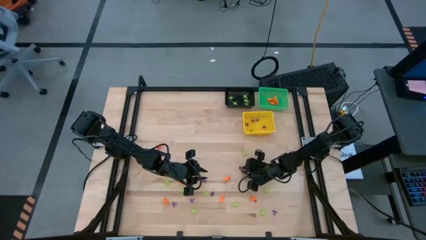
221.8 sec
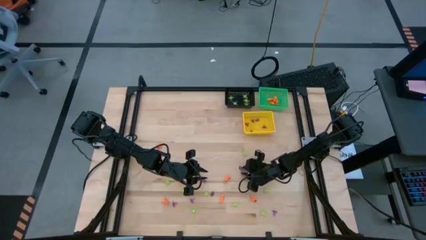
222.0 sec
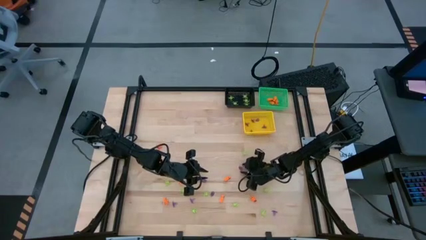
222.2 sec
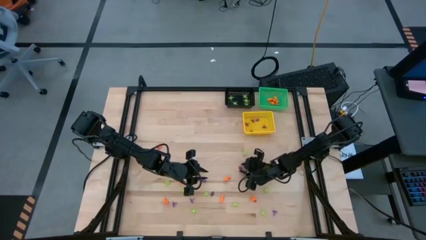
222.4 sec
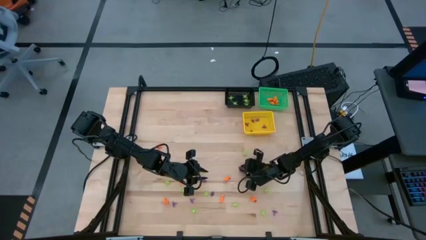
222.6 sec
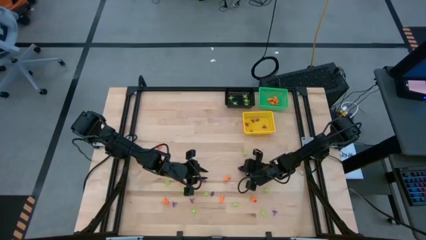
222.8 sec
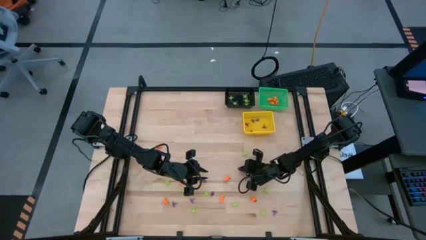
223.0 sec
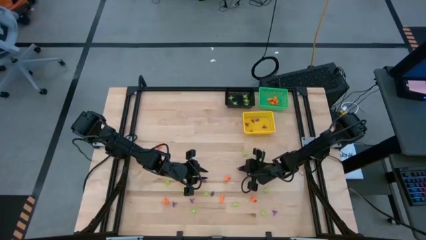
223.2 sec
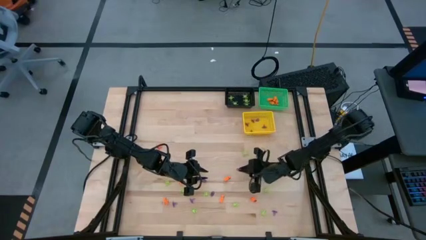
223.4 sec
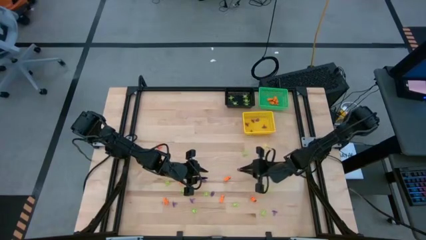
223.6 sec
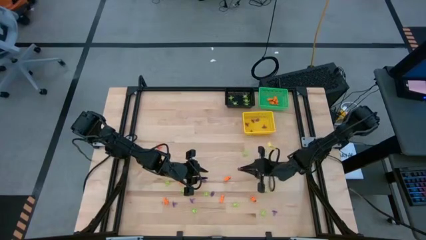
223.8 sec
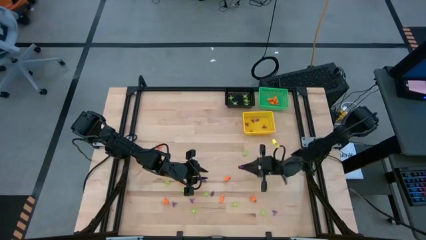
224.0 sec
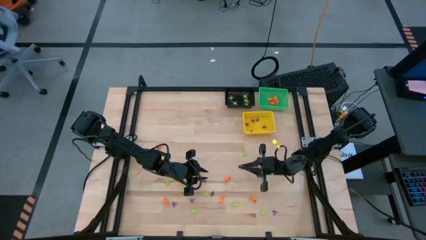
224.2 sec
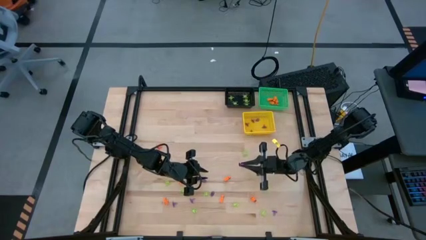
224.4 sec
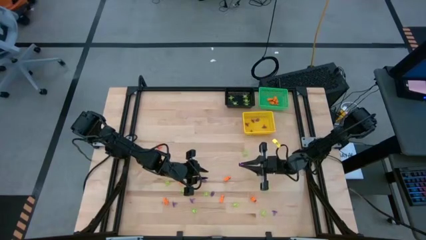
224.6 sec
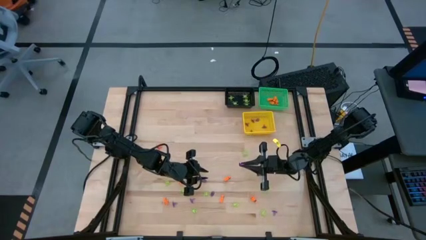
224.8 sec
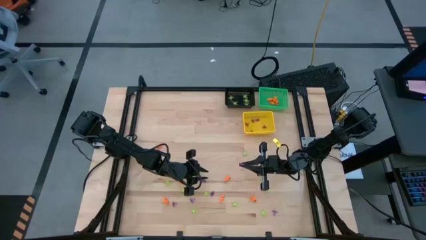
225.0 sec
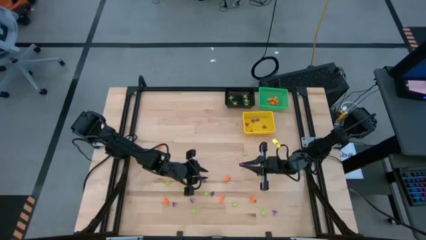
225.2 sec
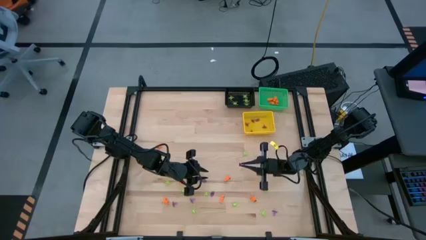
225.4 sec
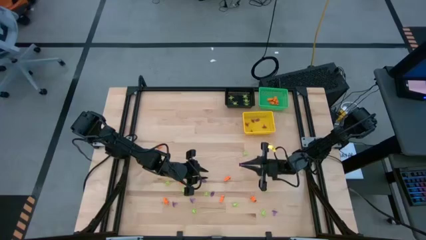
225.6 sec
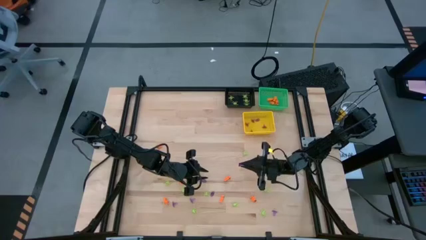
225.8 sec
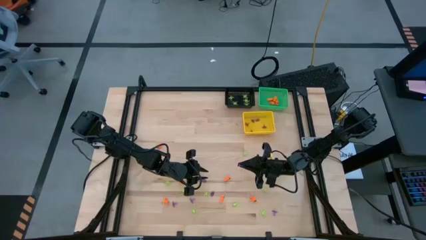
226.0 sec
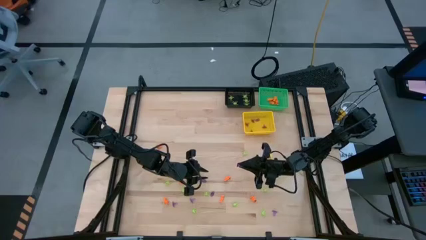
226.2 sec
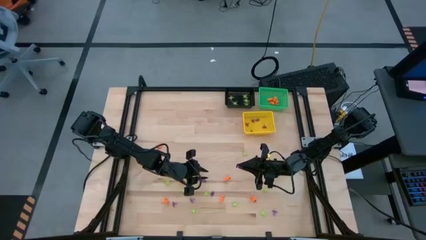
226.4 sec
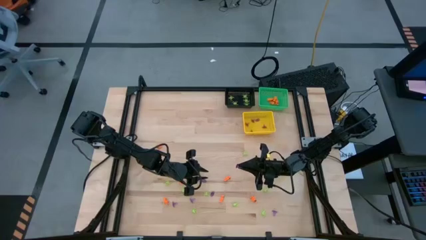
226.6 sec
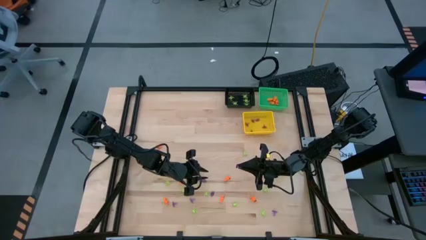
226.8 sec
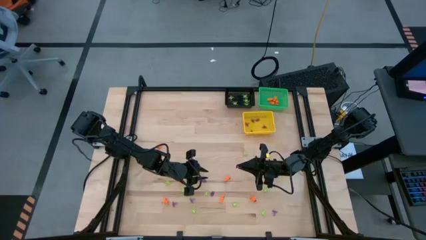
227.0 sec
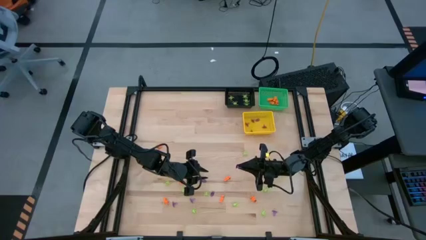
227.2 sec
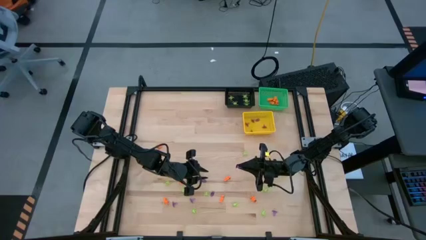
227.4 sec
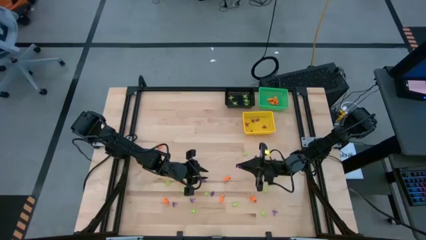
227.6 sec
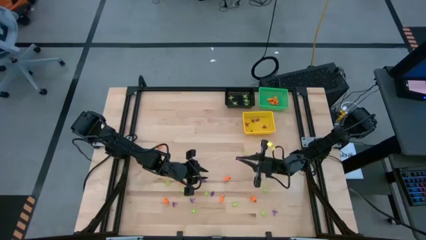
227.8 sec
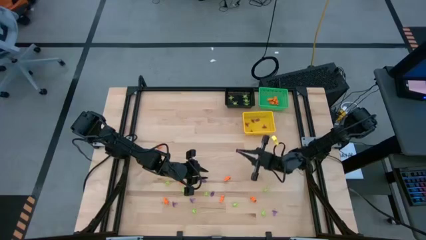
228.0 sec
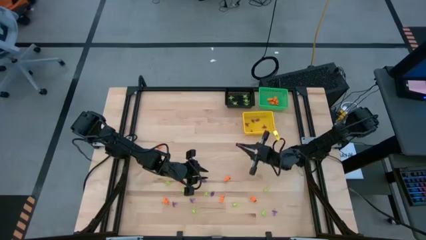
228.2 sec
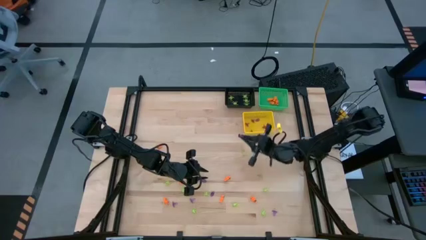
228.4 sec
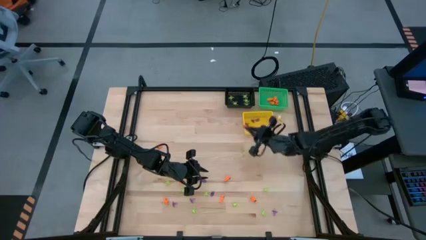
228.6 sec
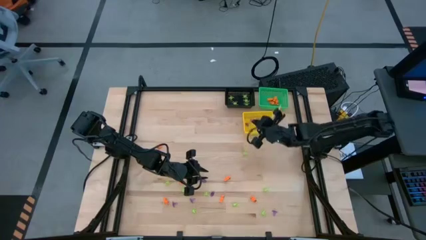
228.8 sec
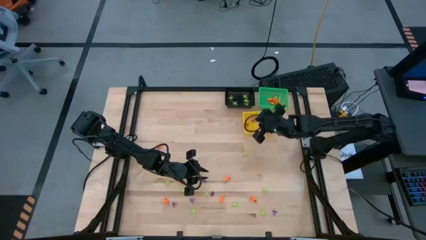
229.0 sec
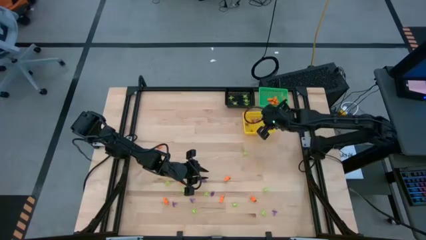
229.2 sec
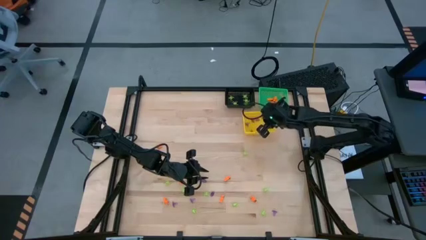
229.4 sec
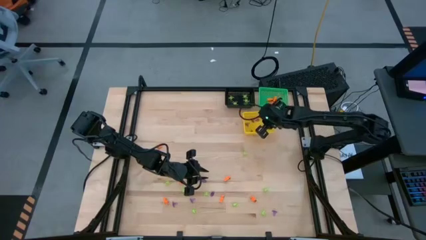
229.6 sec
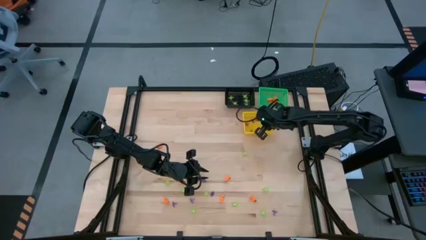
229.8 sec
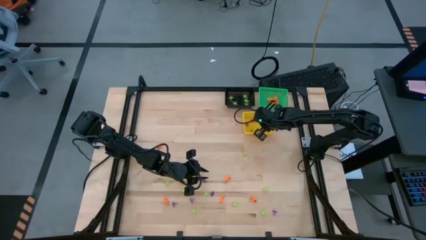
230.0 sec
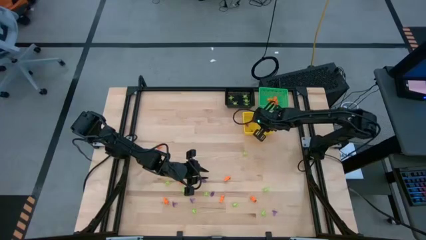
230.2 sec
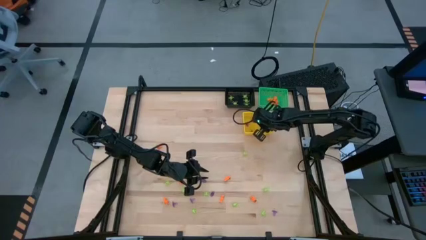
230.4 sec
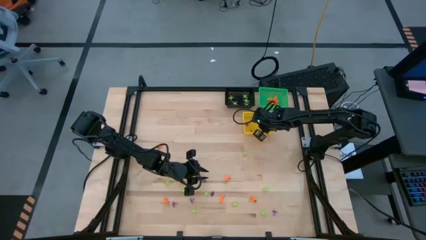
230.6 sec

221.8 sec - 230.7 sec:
Task: Sort Halloween decoration
Put the violet witch hat toy into the yellow basket

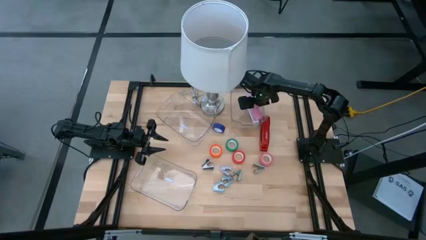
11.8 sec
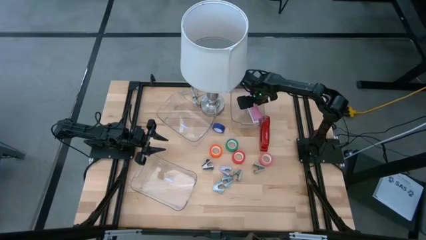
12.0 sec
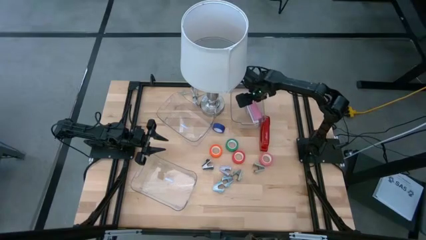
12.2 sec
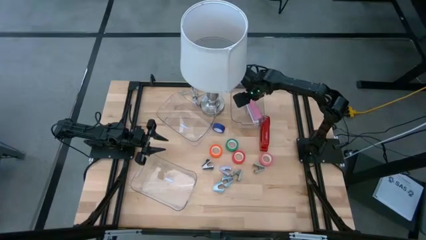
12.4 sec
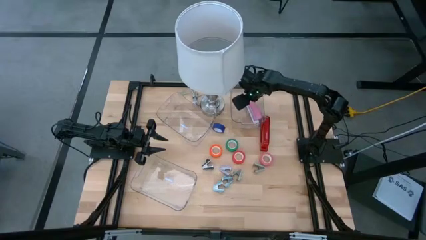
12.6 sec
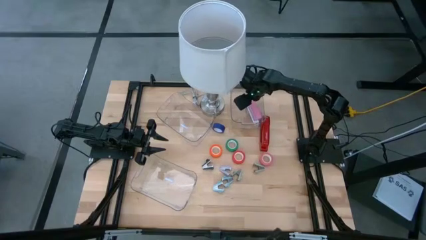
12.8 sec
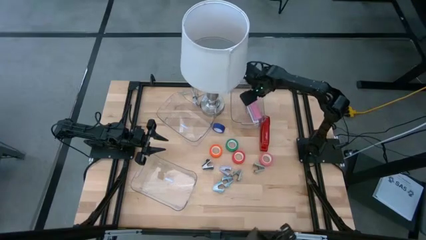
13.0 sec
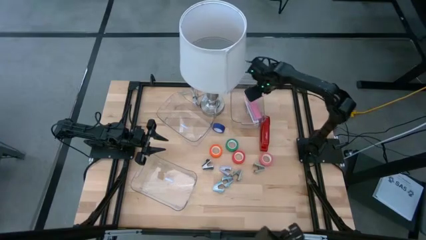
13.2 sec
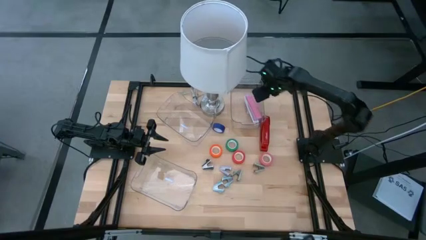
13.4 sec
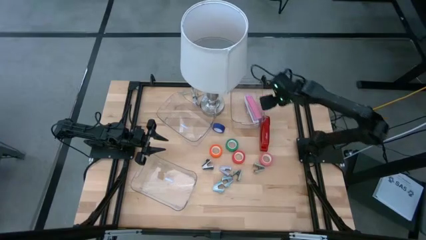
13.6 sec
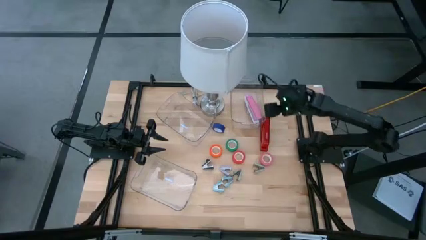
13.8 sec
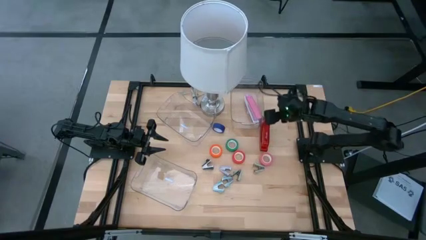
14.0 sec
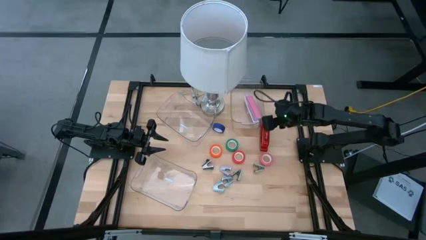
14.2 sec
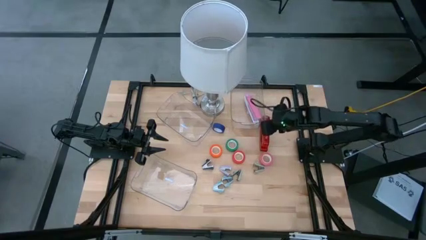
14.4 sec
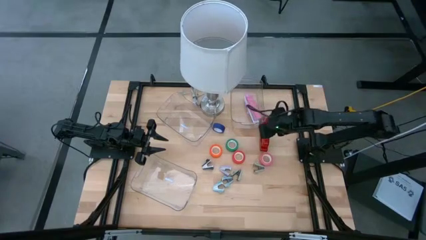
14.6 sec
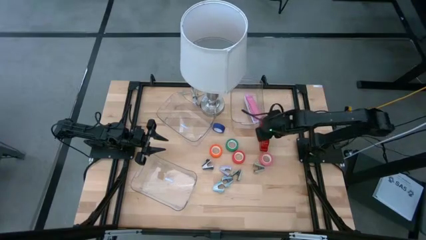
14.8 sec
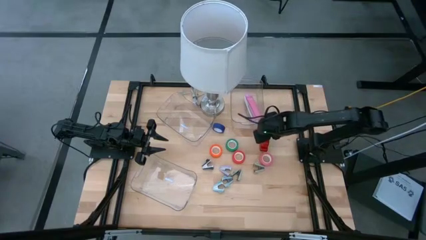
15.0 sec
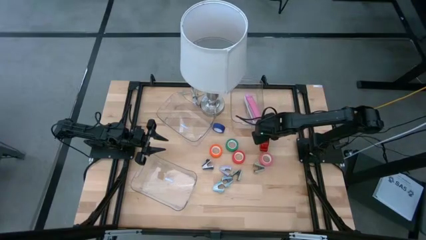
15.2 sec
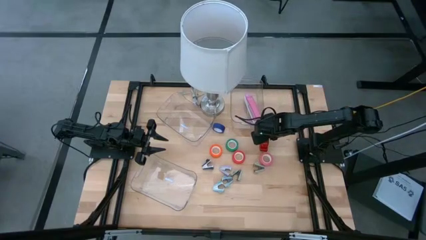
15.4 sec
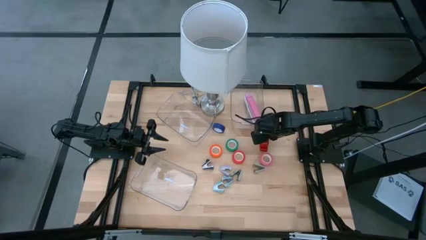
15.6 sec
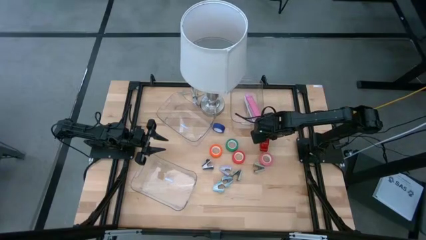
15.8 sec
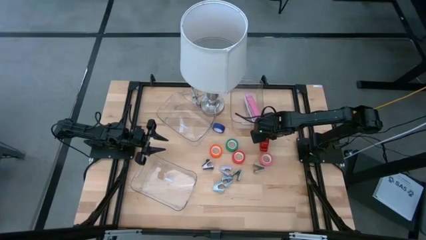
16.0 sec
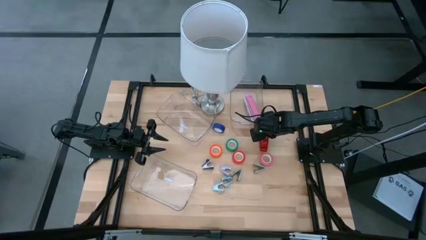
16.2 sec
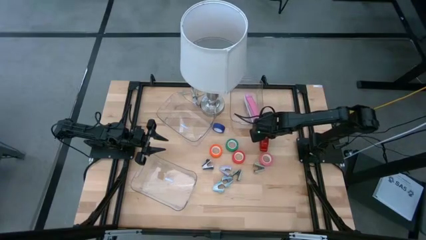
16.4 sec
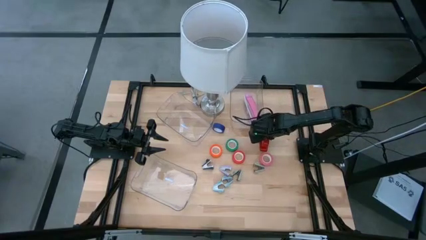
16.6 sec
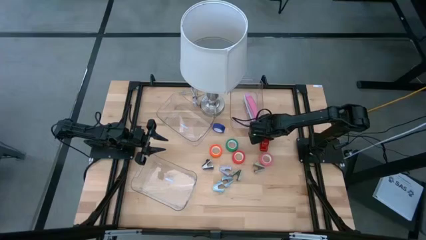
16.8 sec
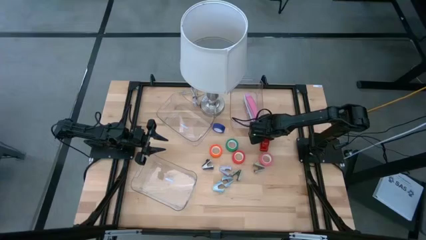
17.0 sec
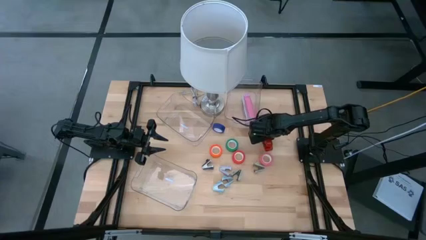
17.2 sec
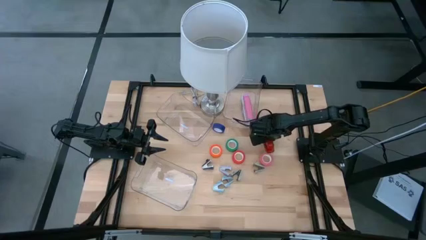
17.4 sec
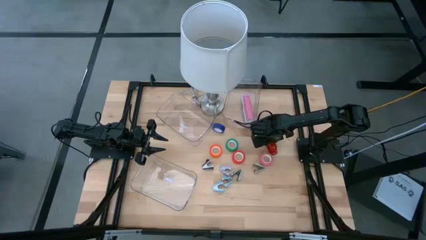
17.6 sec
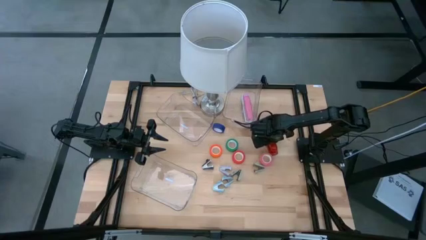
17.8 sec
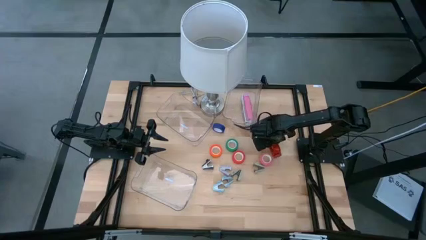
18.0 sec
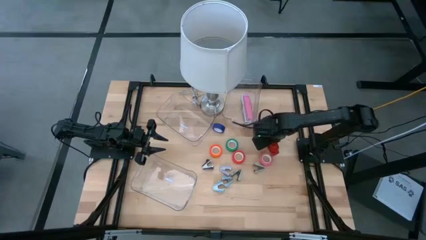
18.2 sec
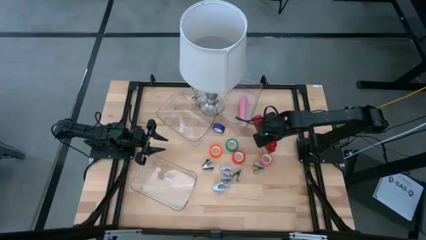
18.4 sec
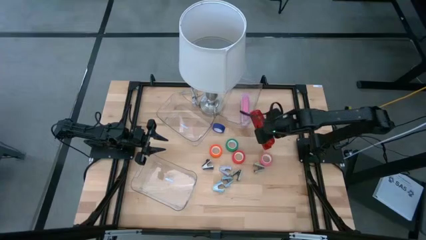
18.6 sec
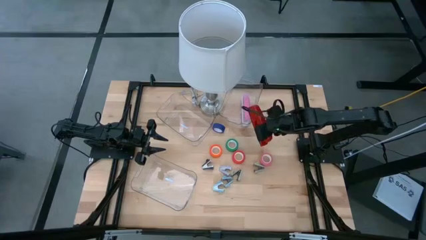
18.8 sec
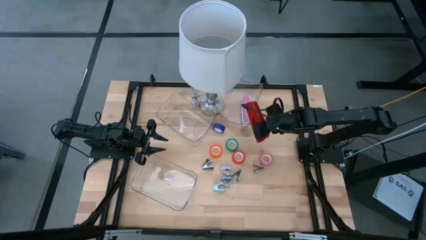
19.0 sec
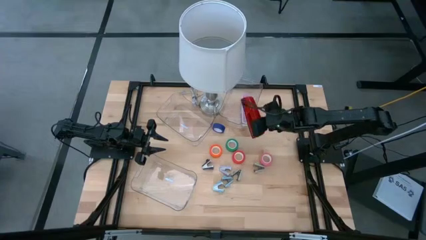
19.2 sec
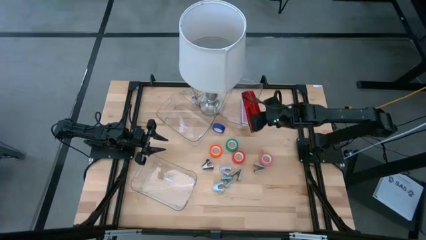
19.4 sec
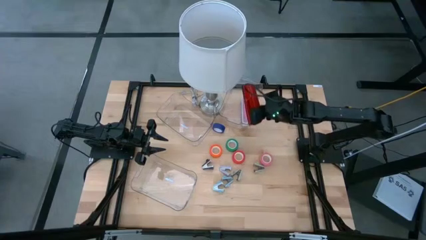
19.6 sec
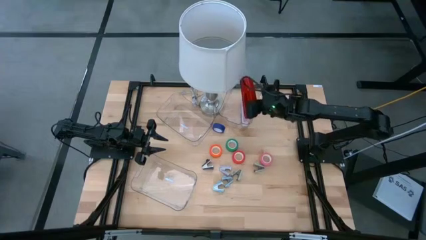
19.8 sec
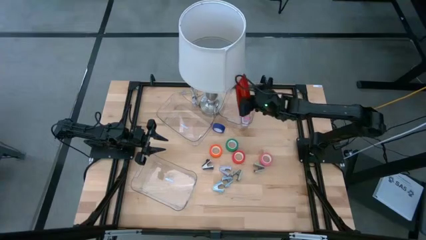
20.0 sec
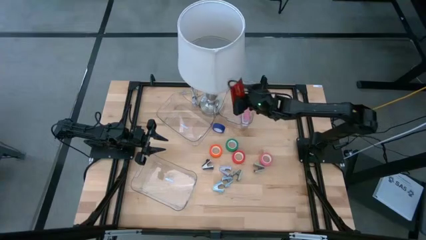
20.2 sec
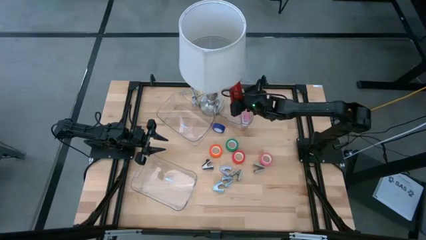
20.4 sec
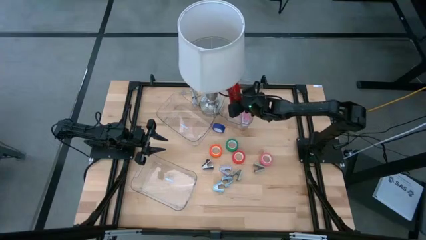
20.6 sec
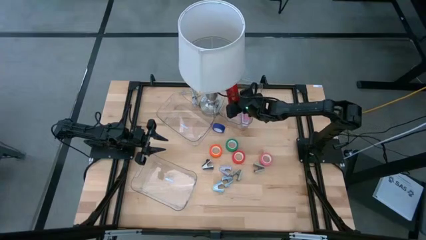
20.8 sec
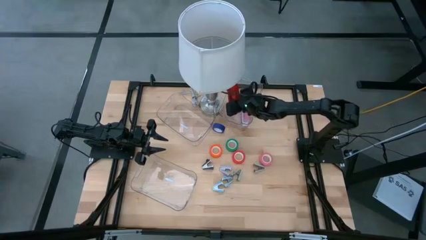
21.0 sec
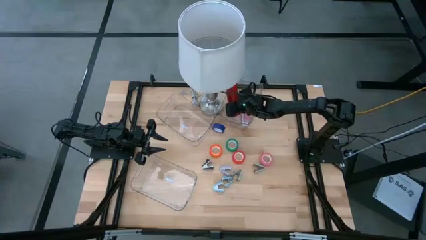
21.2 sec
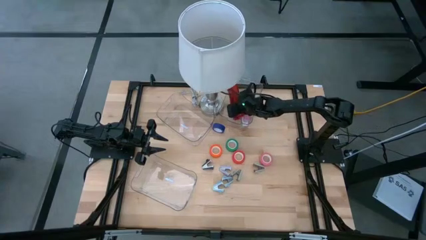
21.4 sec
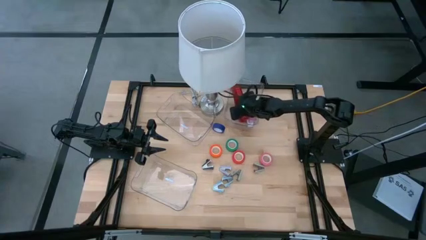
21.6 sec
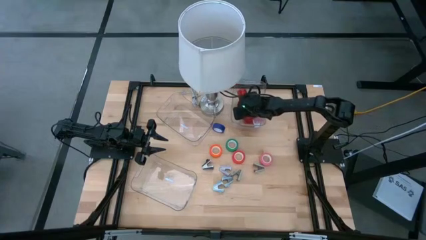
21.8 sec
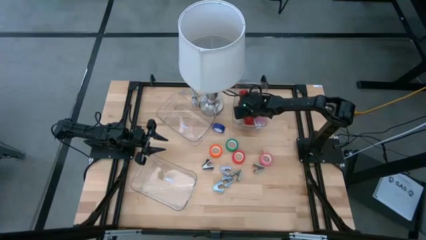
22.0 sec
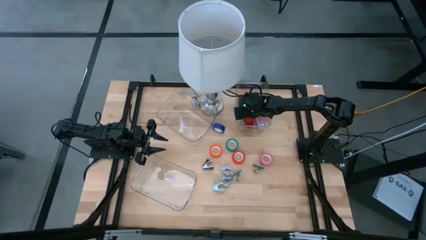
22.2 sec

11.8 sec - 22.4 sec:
Task: Pick and place Stapler, Stapler remover, tape
Put the red stapler into the top right transparent bin
